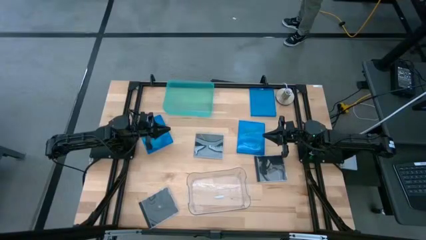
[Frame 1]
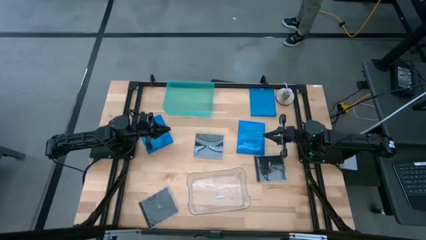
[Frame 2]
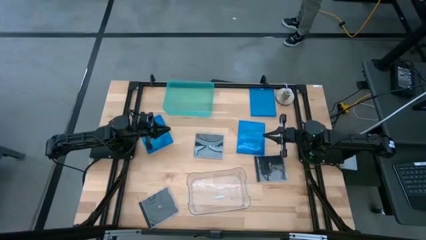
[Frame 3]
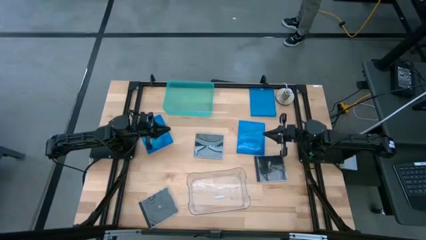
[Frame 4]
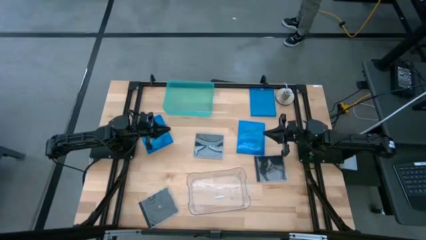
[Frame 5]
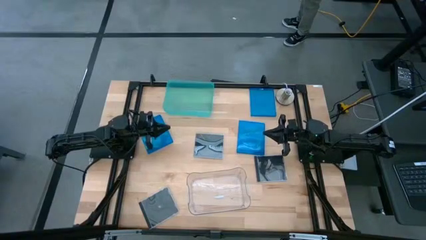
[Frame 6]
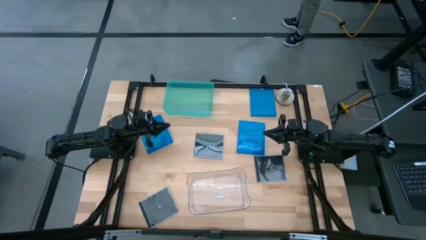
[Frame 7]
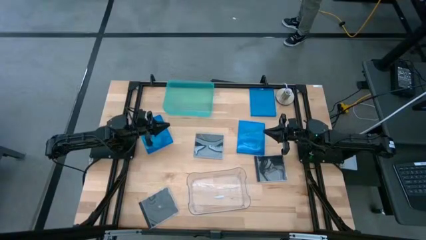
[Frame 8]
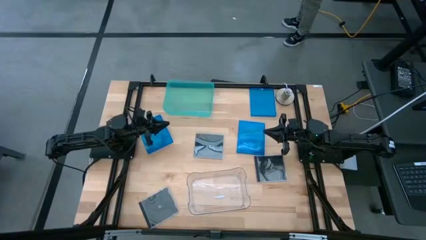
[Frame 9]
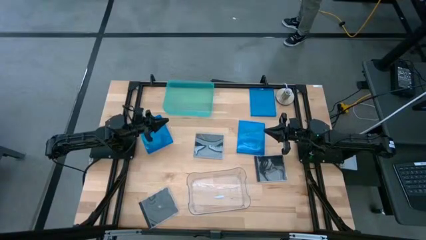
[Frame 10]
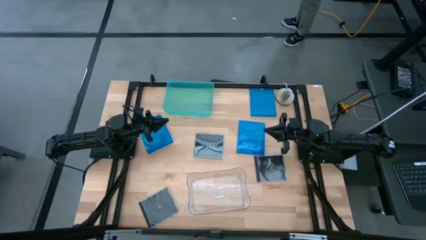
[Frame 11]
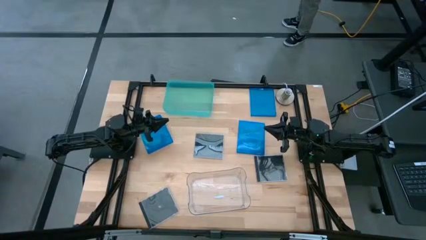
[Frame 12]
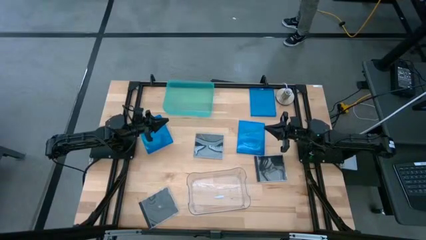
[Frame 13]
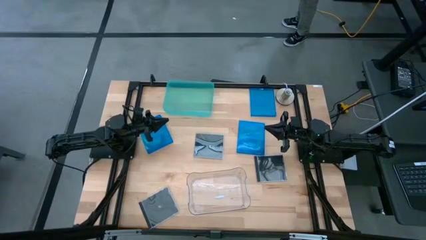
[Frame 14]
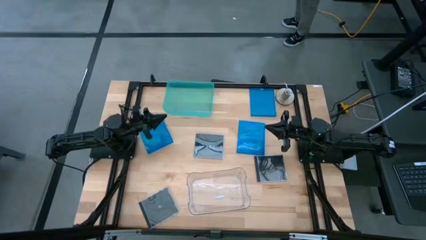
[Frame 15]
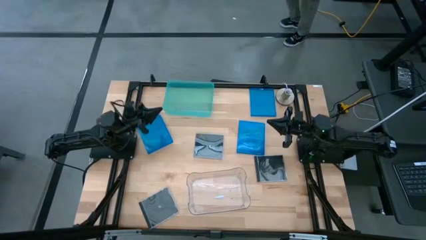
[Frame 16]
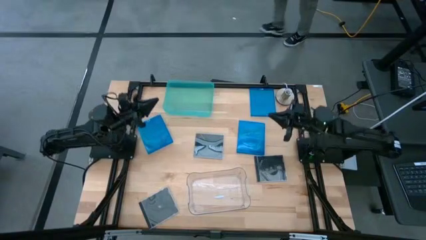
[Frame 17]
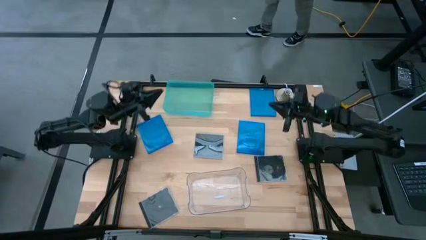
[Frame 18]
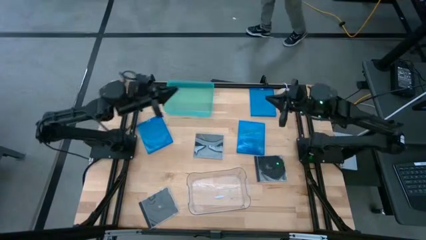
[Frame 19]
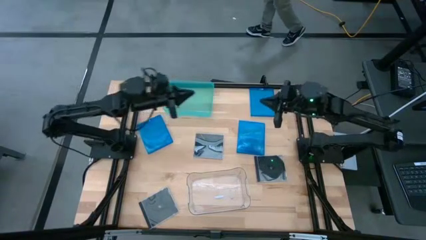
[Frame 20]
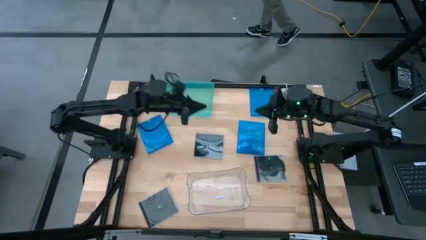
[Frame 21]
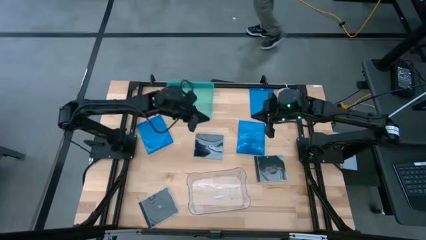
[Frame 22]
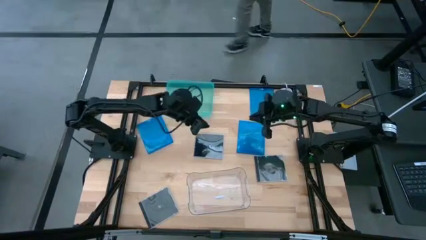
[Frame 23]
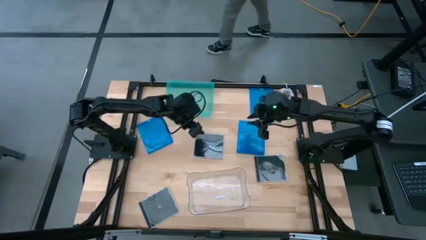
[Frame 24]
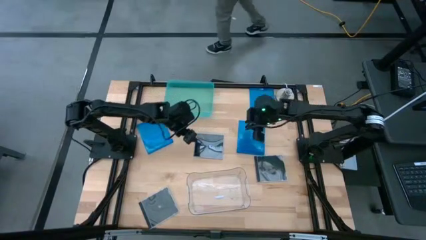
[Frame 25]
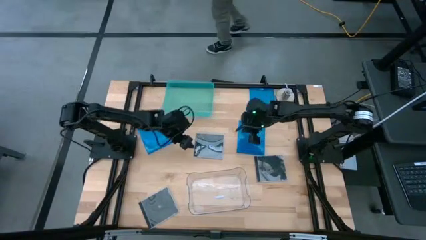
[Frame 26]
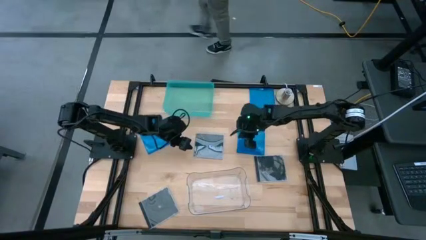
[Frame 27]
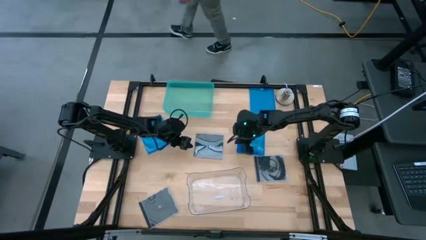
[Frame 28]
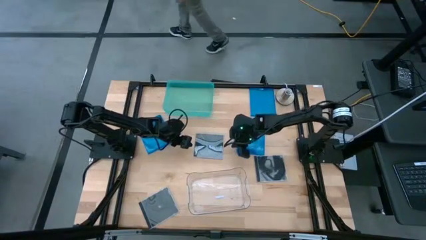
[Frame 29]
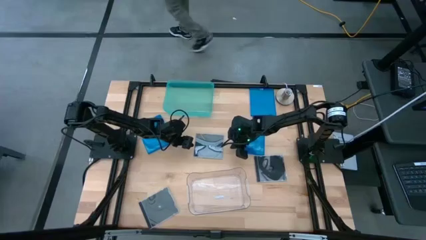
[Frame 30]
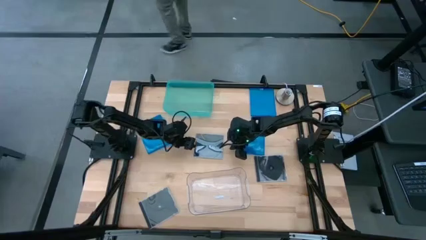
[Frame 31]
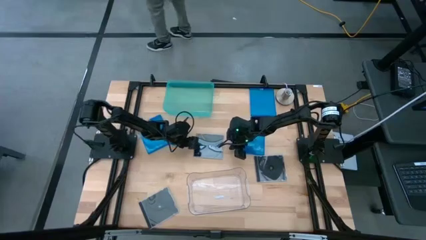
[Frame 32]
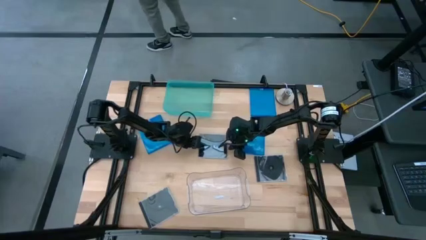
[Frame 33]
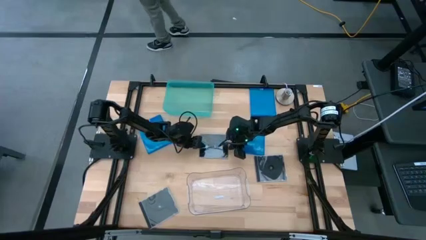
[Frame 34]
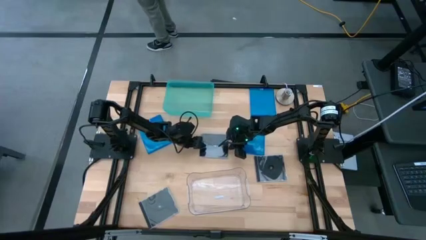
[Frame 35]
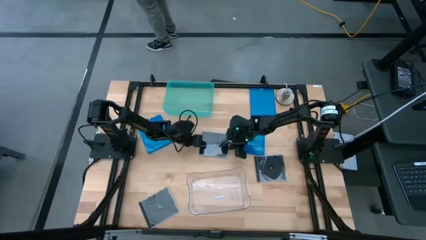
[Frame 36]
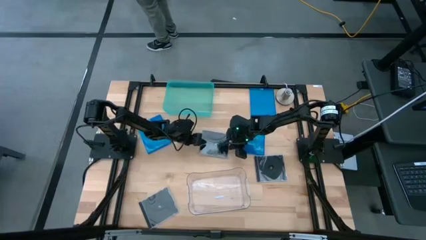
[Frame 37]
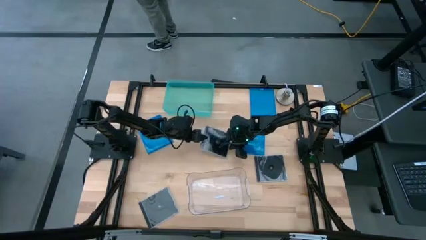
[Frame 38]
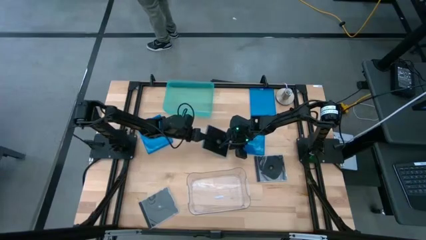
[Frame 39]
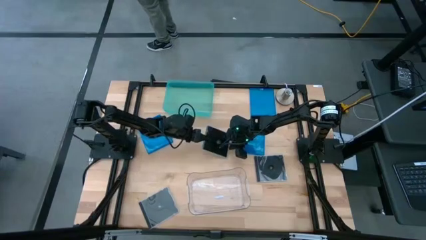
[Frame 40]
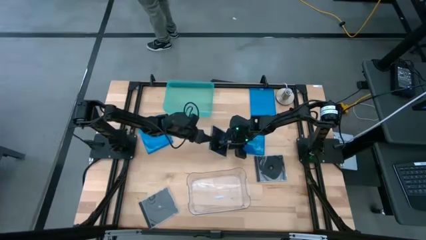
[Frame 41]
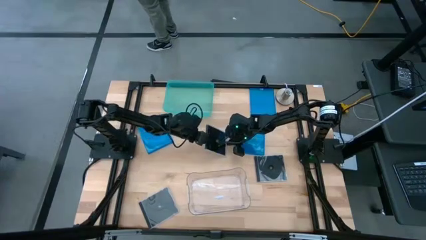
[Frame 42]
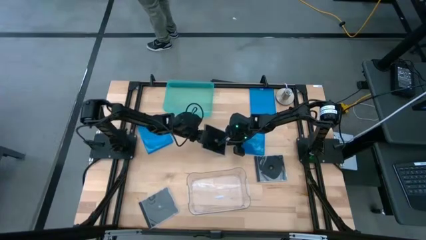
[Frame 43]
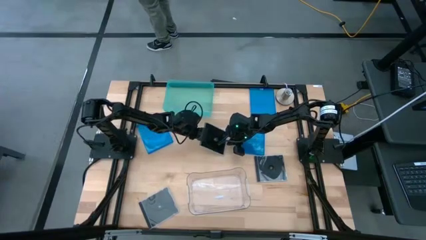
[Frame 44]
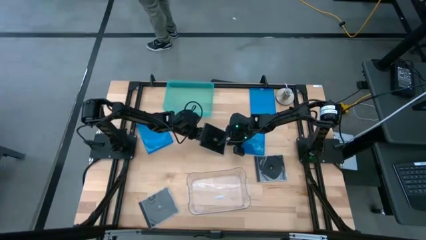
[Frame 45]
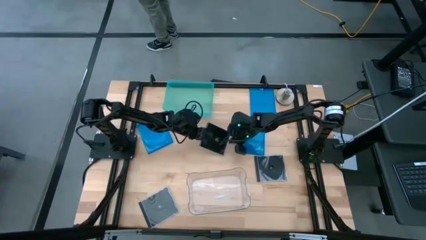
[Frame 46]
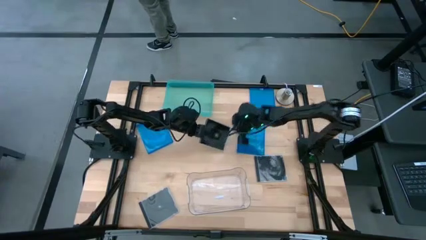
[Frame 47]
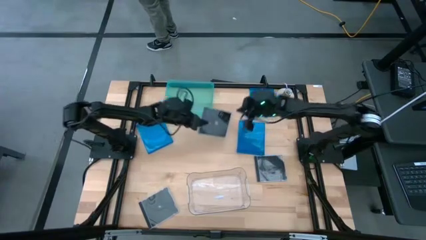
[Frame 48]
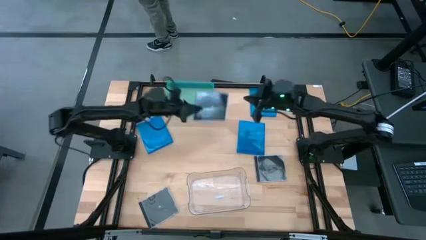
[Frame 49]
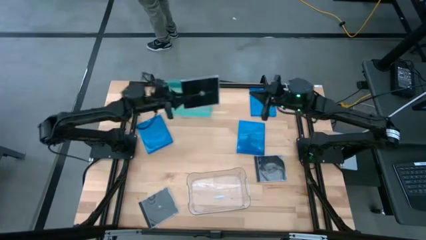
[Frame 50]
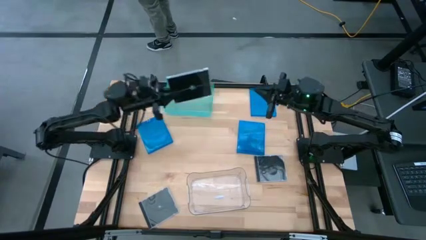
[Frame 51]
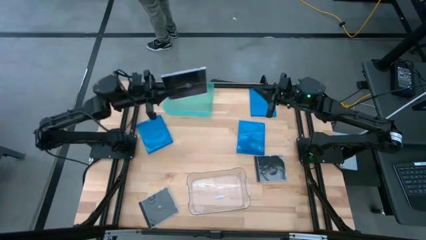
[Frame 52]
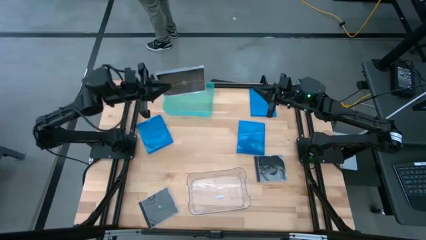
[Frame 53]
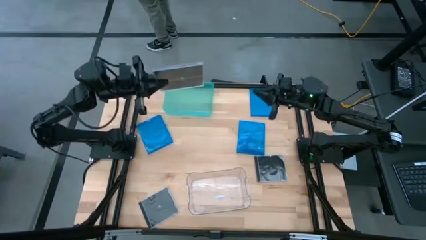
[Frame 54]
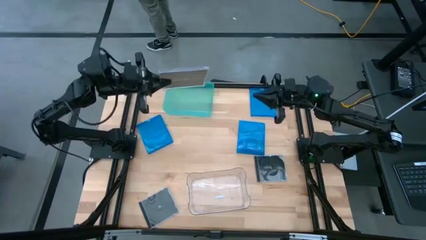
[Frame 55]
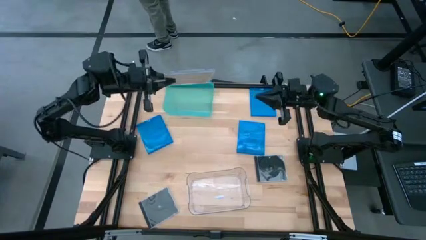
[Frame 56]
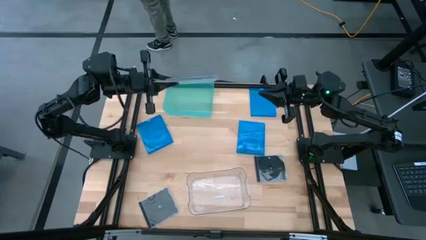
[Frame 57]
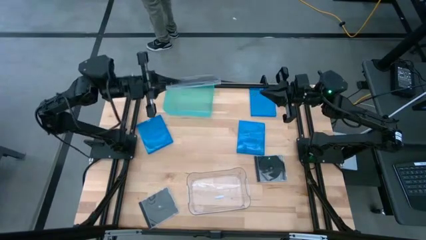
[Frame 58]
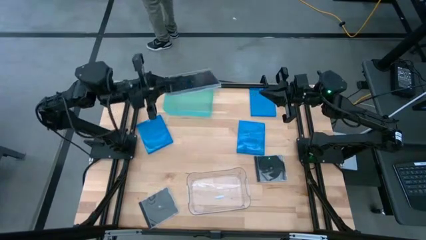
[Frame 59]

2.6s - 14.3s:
Task: Pick & place jewel cases by type
Put the top black CD case into the transparent bin
